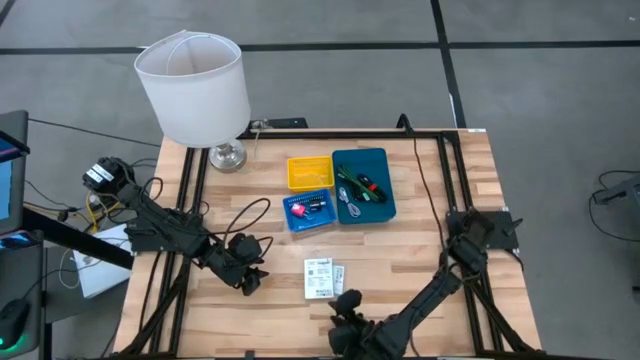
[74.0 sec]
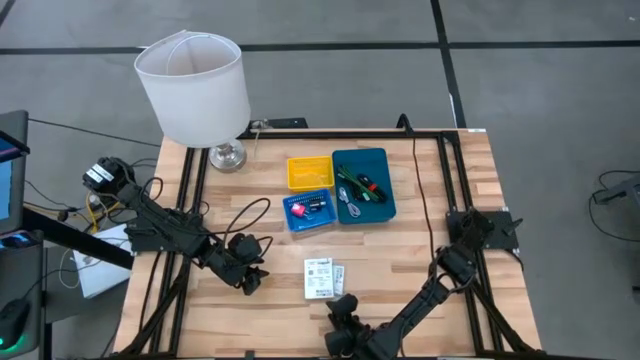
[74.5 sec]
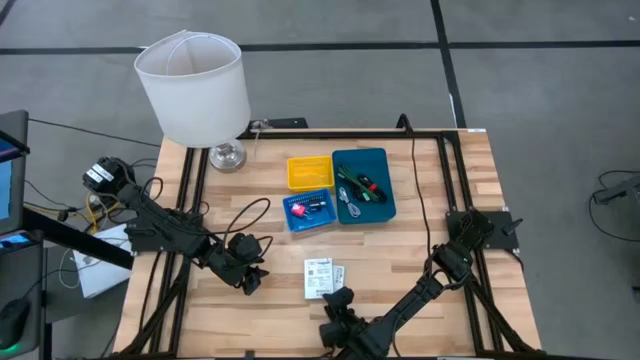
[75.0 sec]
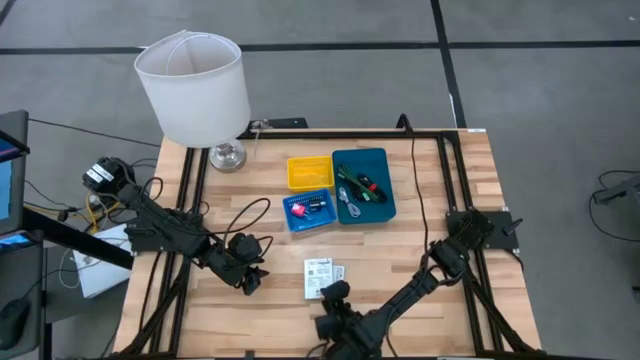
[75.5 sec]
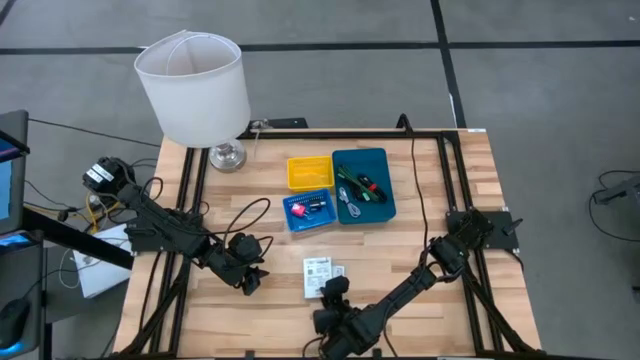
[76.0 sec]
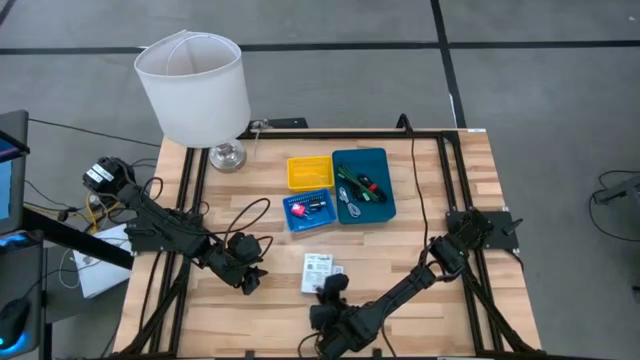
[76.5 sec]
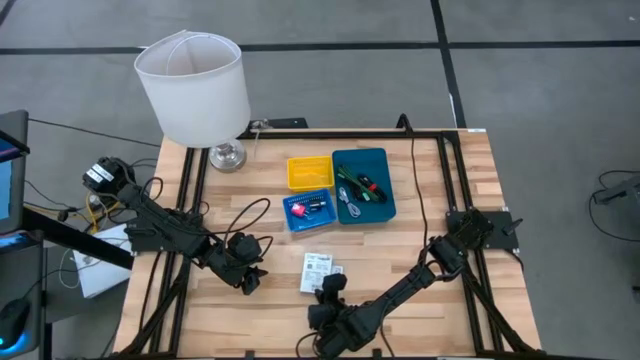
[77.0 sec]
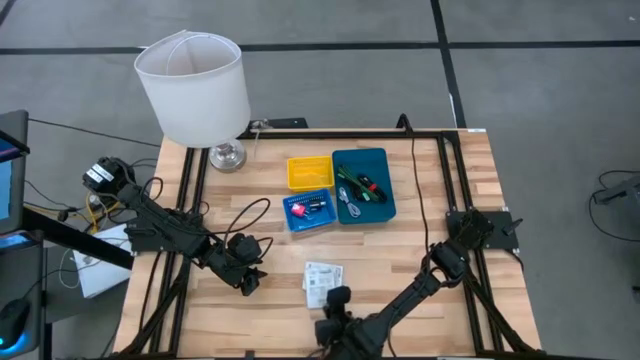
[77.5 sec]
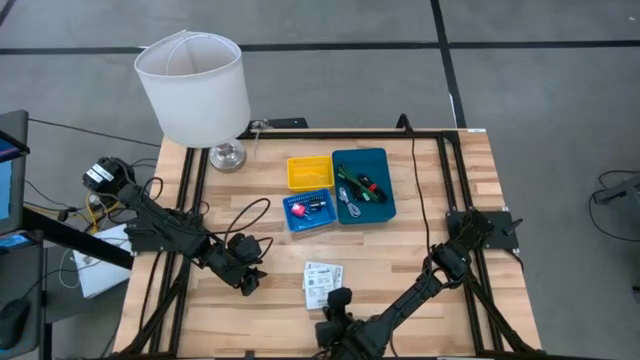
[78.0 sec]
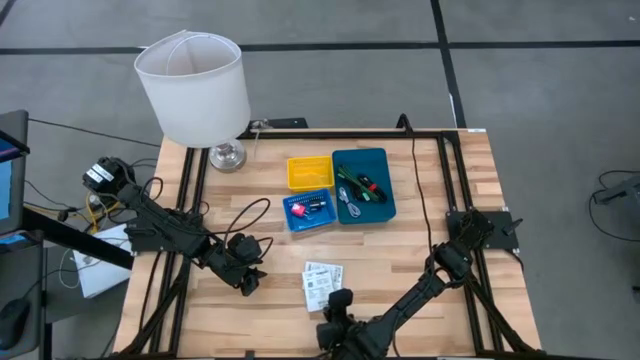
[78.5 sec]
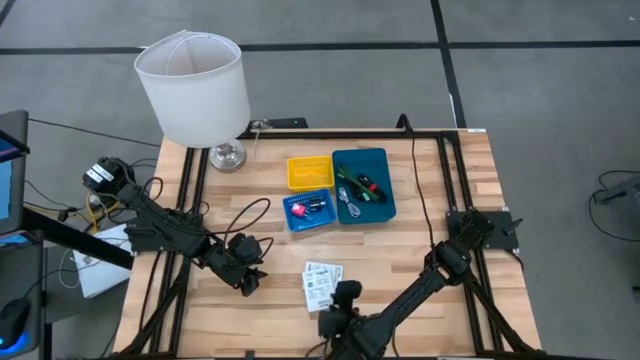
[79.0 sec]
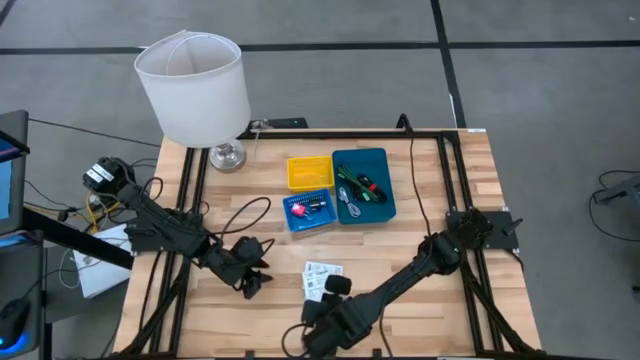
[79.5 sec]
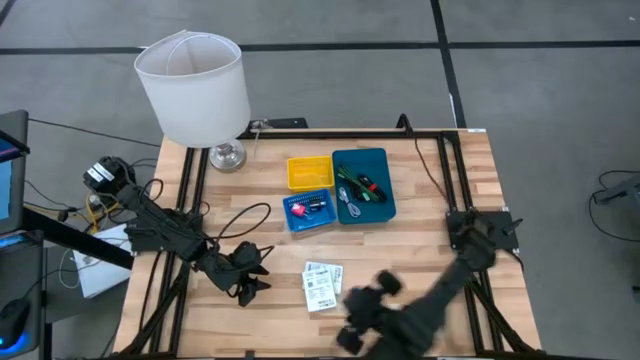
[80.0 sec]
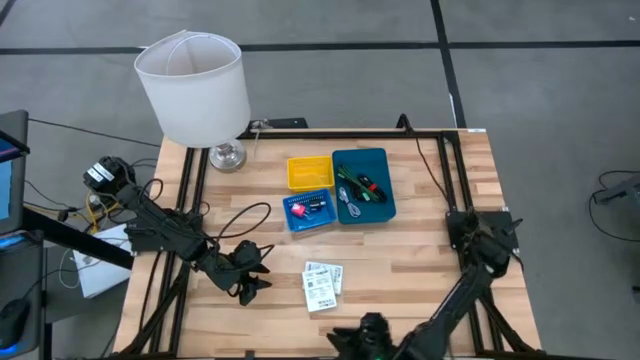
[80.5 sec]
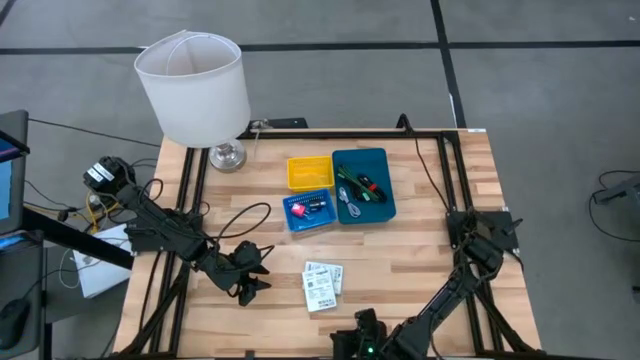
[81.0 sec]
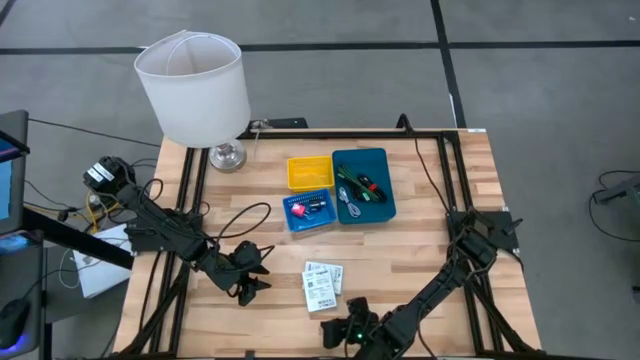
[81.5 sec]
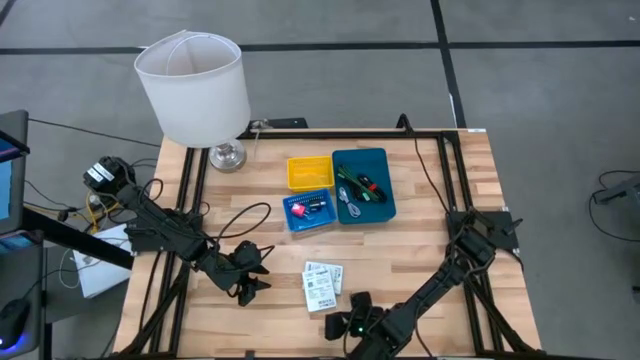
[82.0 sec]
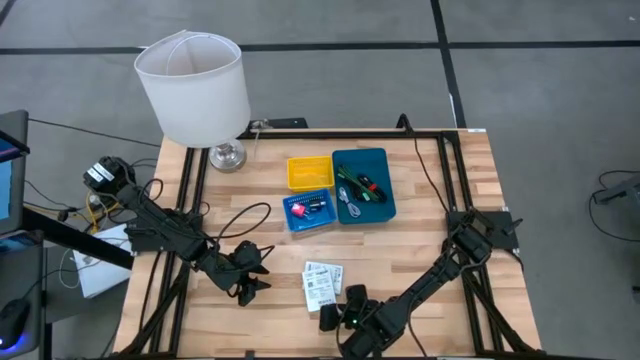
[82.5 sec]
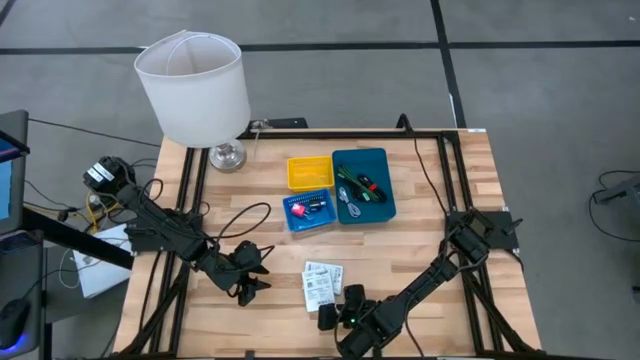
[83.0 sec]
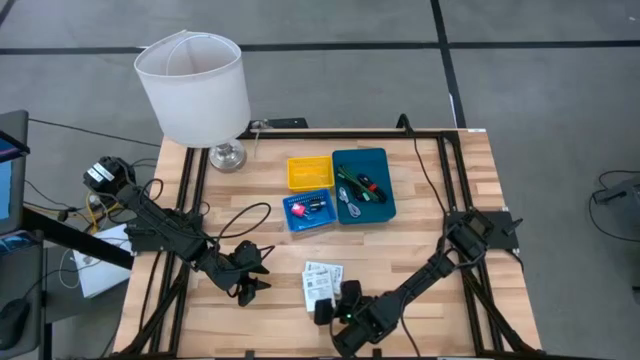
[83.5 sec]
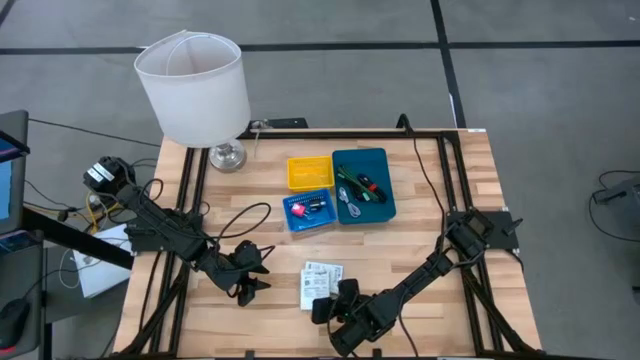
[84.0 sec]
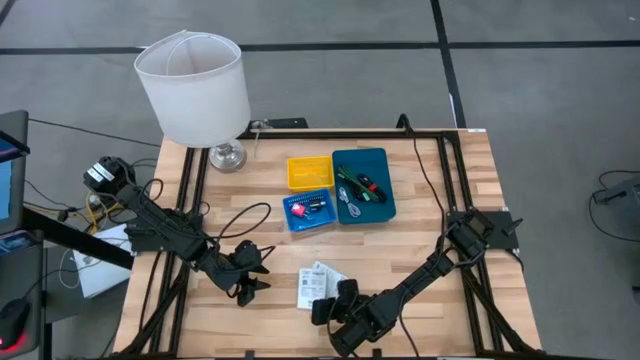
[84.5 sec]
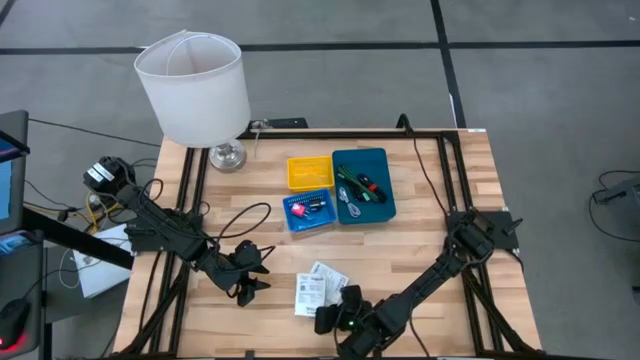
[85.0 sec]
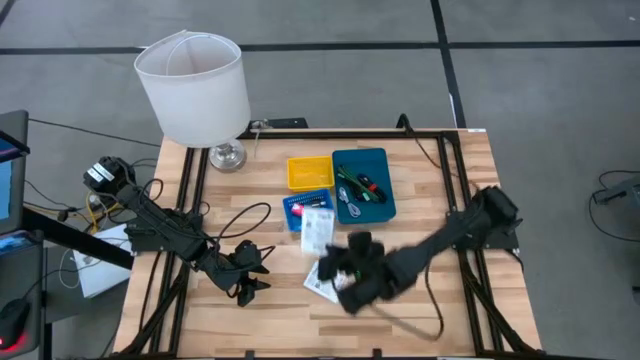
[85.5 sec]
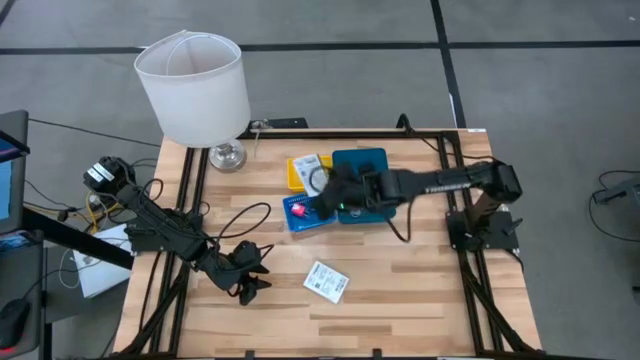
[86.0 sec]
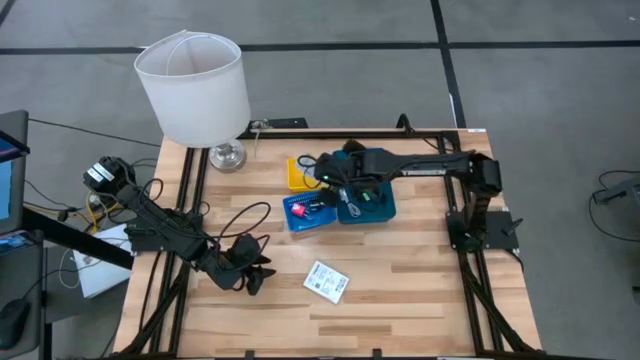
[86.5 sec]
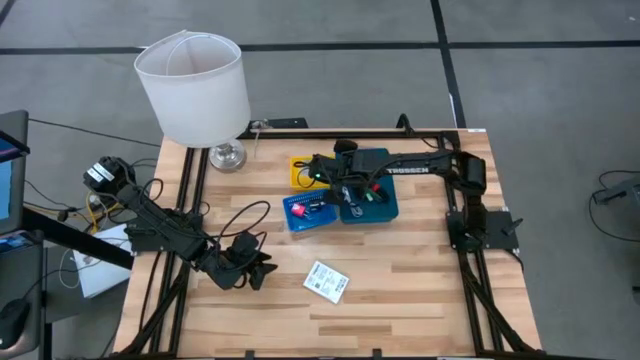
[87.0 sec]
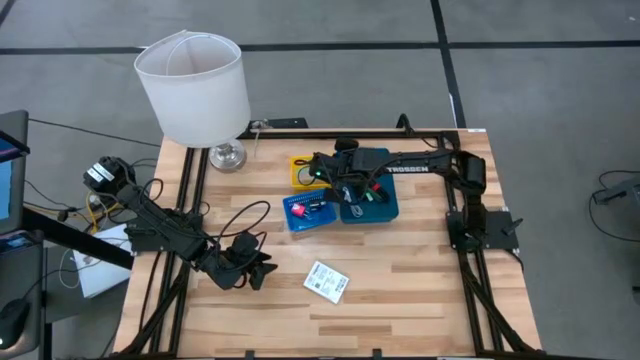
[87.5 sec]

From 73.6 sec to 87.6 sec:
Task: Pick and place items into bin
Put the top white card reader box into the yellow bin

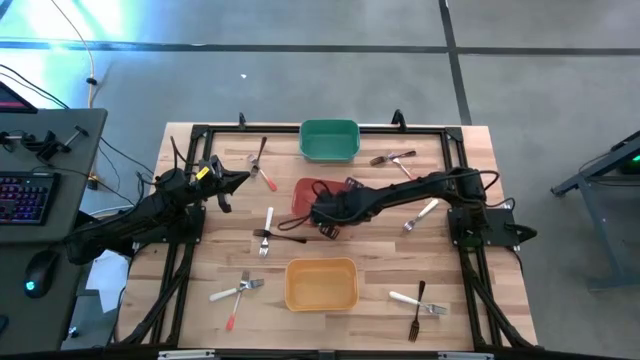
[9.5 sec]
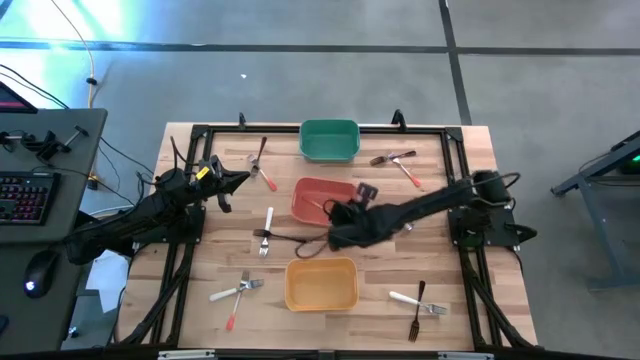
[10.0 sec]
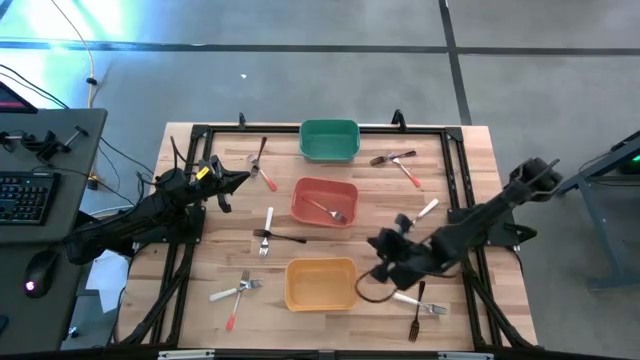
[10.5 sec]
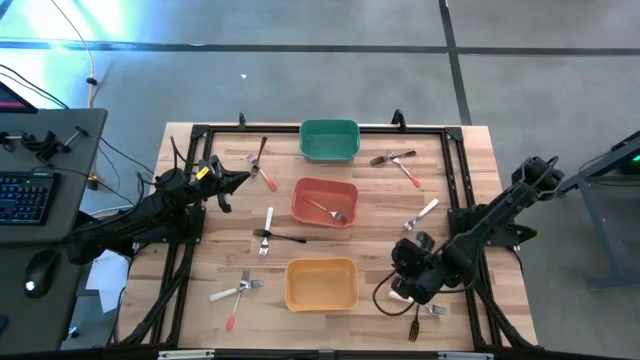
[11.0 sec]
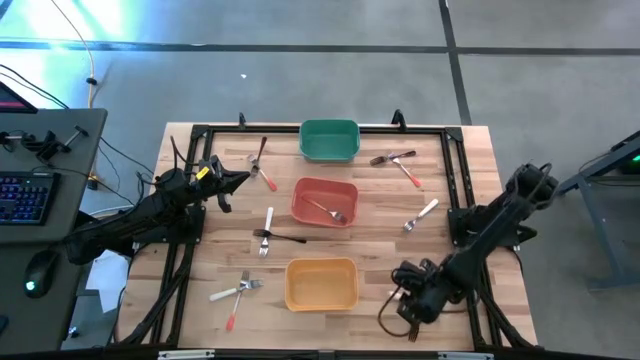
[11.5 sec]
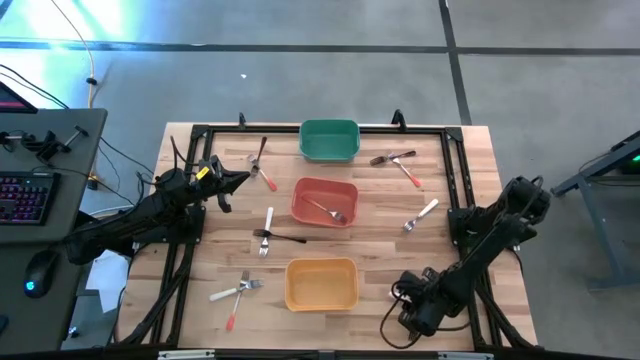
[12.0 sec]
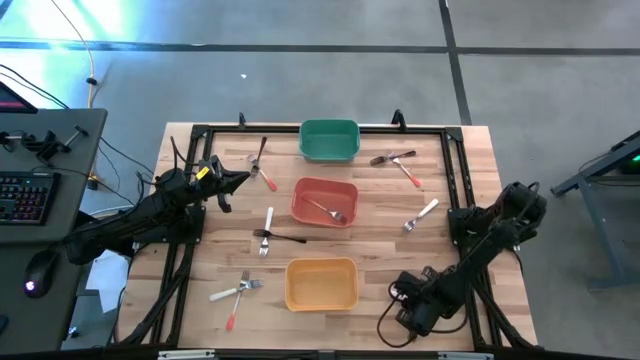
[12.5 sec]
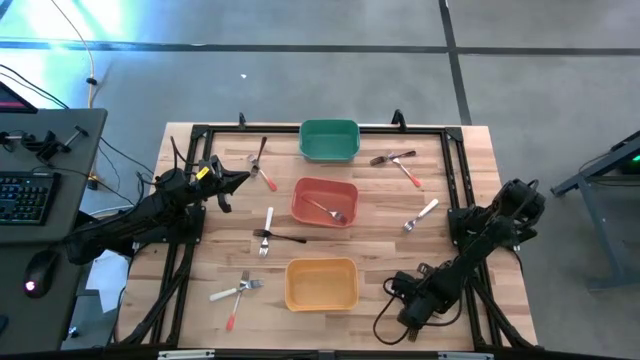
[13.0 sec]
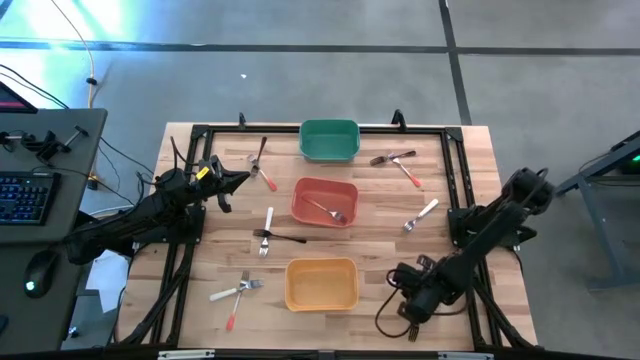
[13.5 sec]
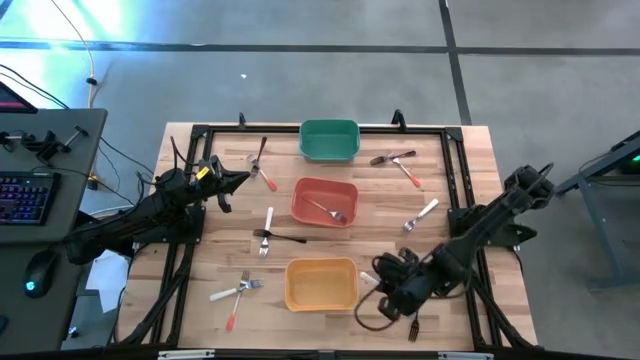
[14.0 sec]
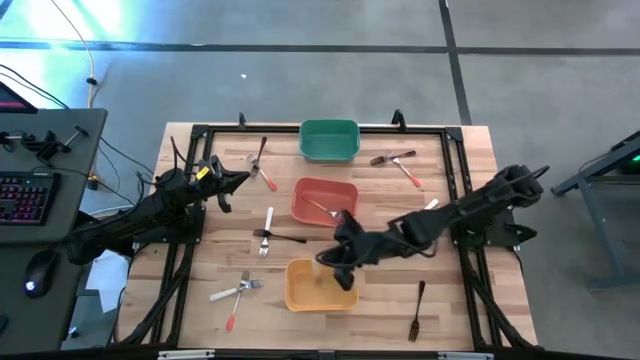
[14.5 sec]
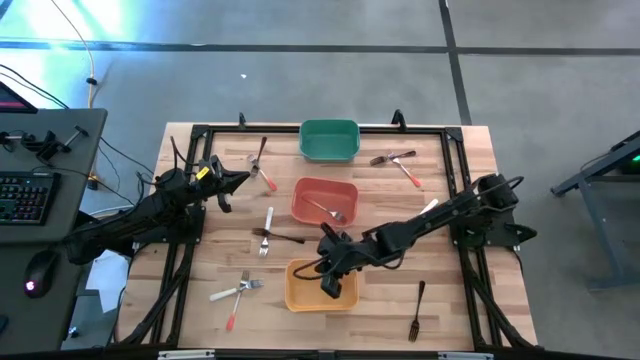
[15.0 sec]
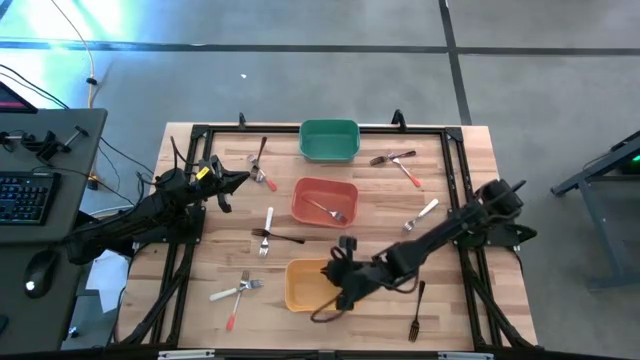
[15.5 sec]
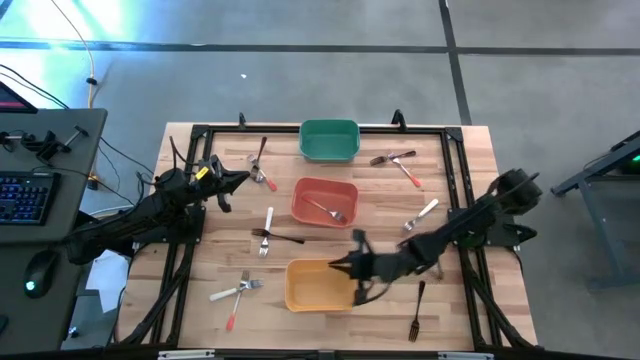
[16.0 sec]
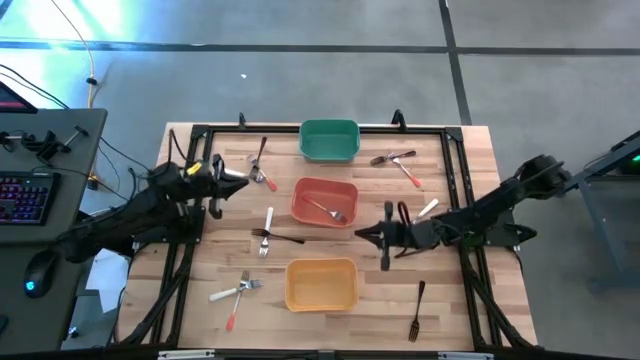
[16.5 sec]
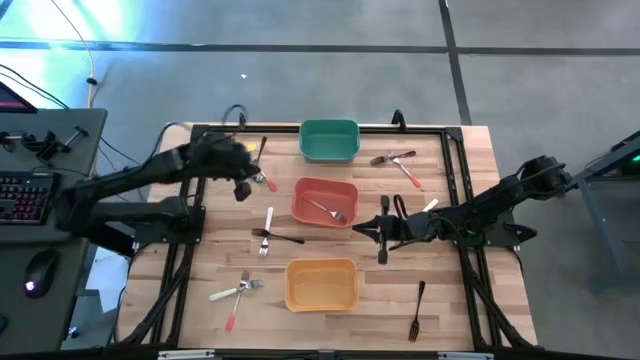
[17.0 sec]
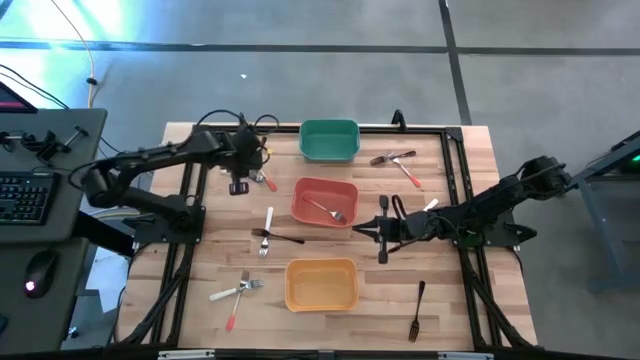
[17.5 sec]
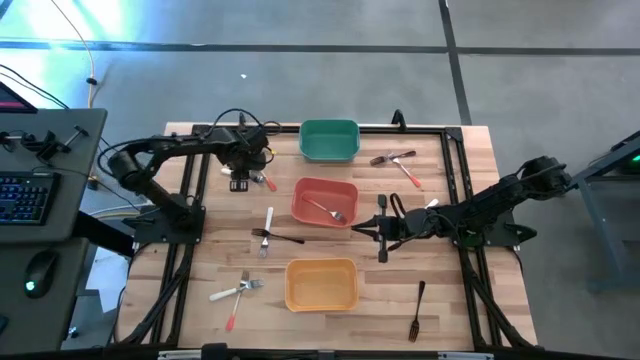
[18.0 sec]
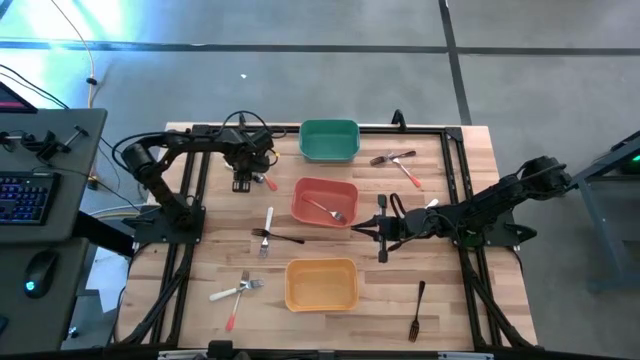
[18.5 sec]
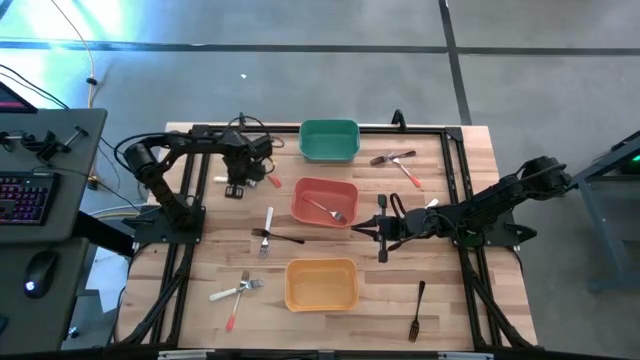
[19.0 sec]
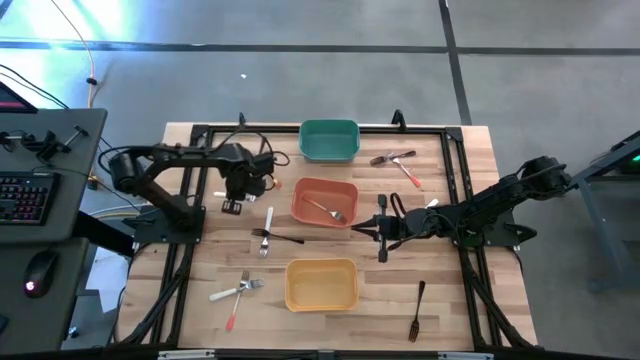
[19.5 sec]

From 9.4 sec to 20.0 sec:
Task: Sort silverware by color (type)
Put the white fork into the yellow bin
